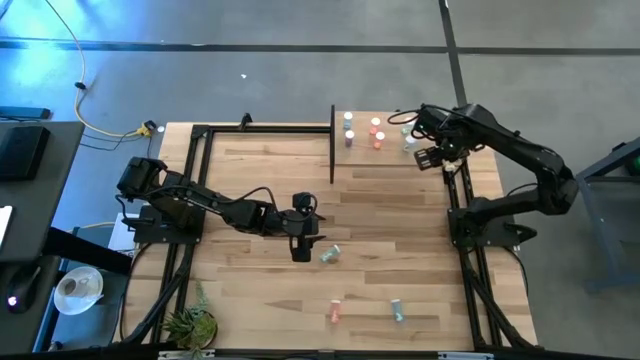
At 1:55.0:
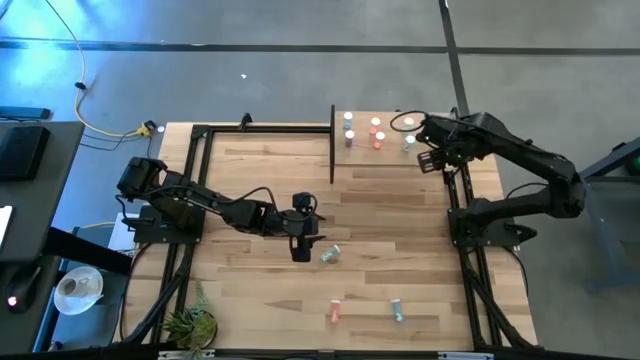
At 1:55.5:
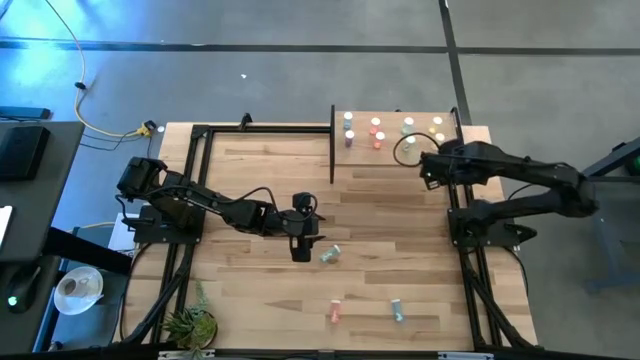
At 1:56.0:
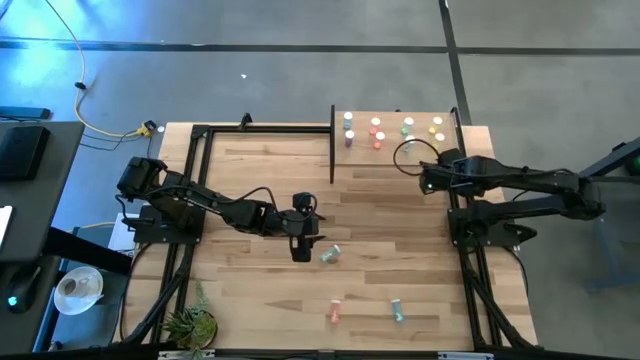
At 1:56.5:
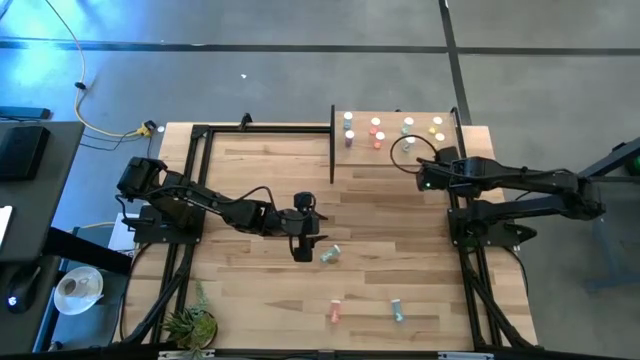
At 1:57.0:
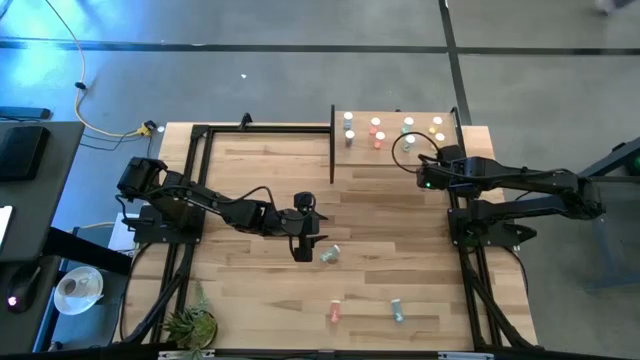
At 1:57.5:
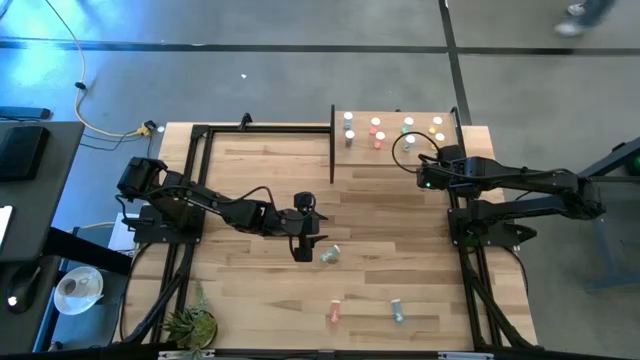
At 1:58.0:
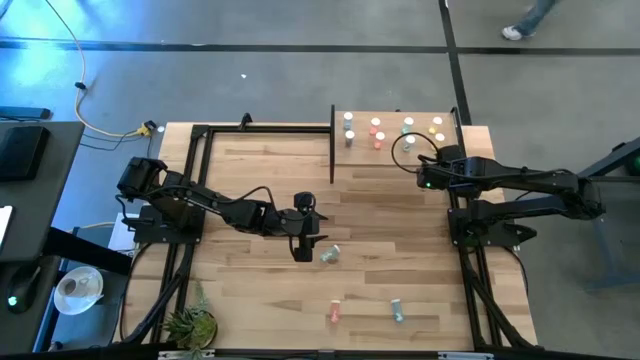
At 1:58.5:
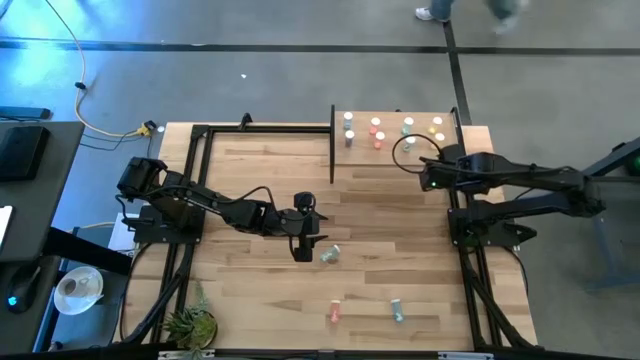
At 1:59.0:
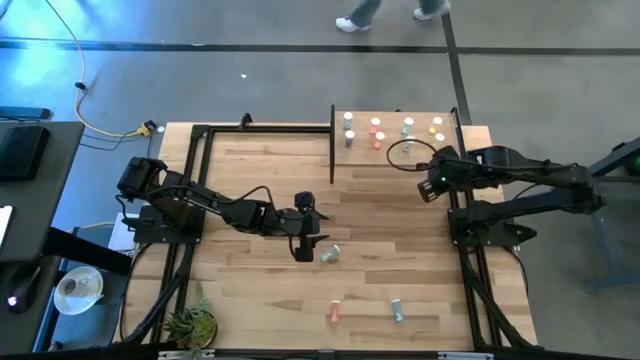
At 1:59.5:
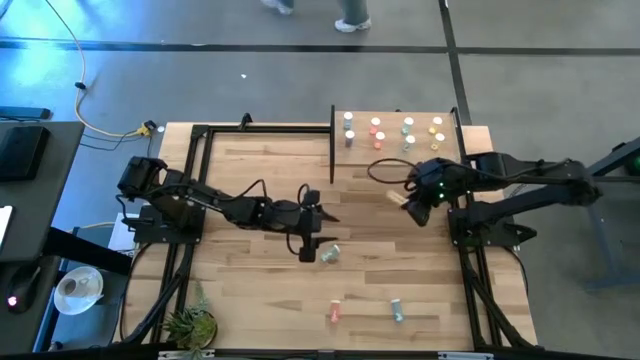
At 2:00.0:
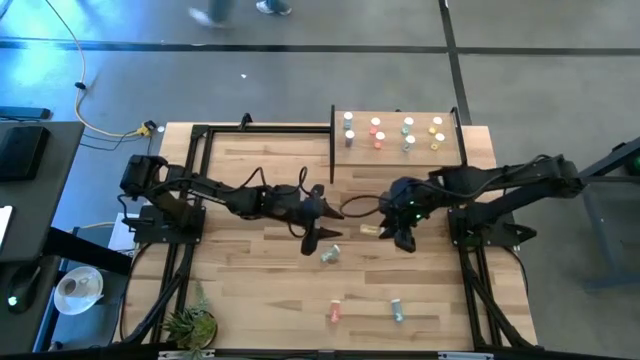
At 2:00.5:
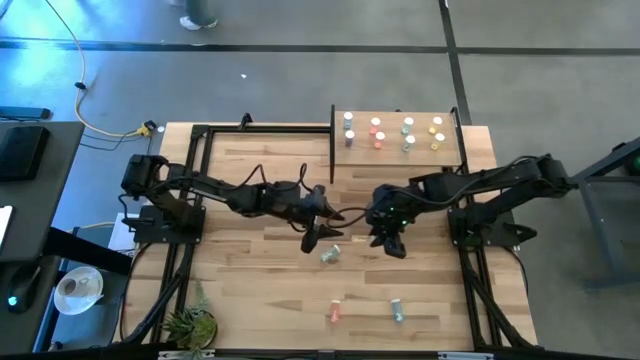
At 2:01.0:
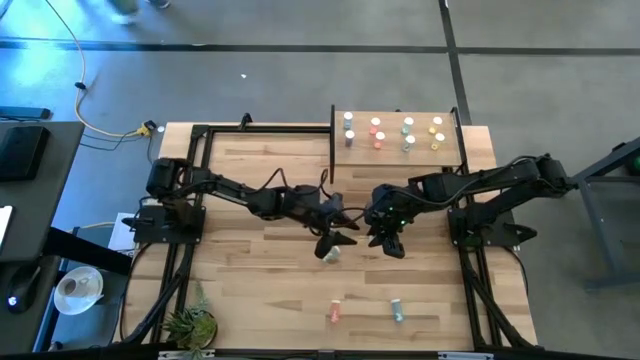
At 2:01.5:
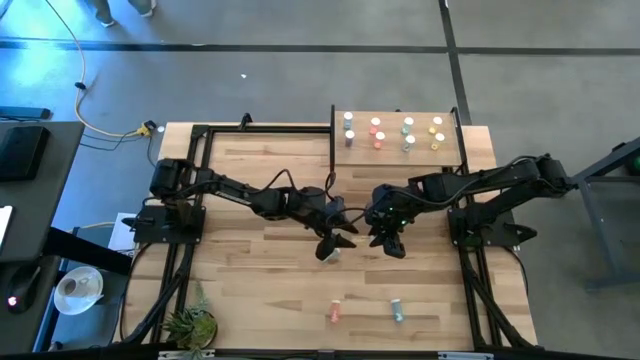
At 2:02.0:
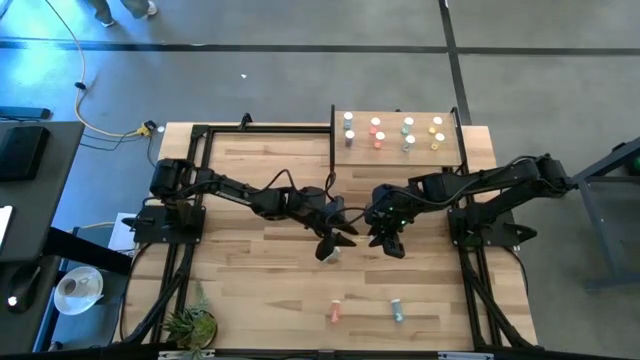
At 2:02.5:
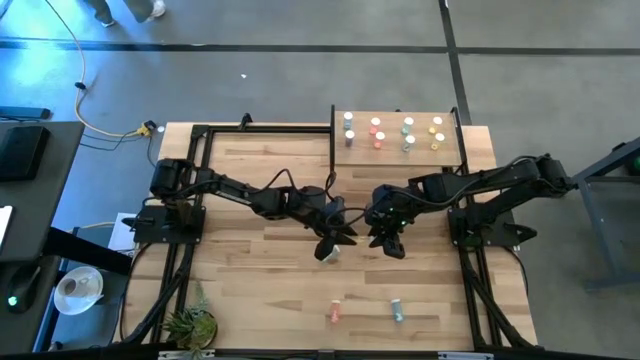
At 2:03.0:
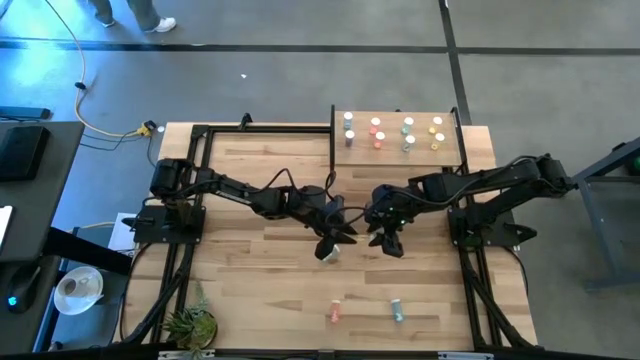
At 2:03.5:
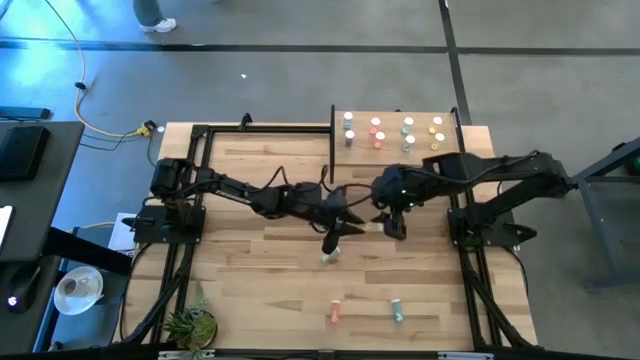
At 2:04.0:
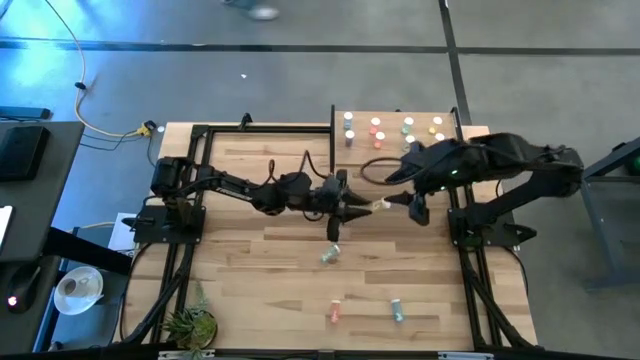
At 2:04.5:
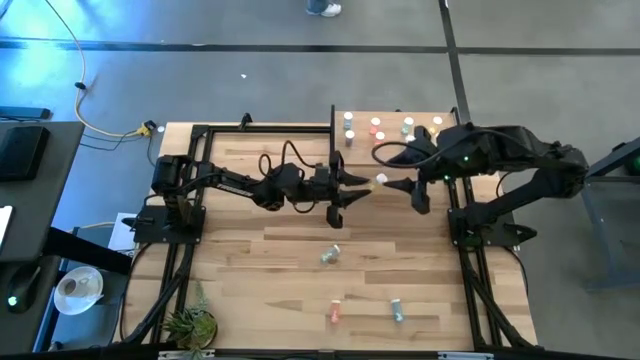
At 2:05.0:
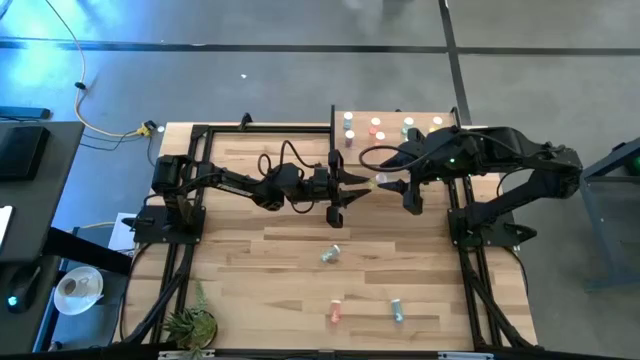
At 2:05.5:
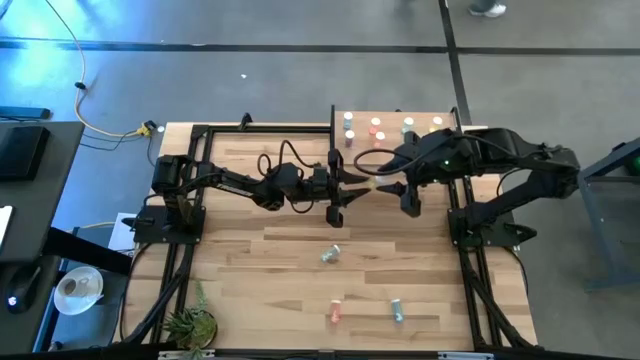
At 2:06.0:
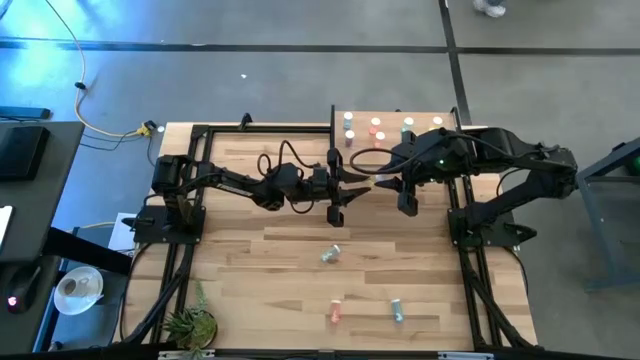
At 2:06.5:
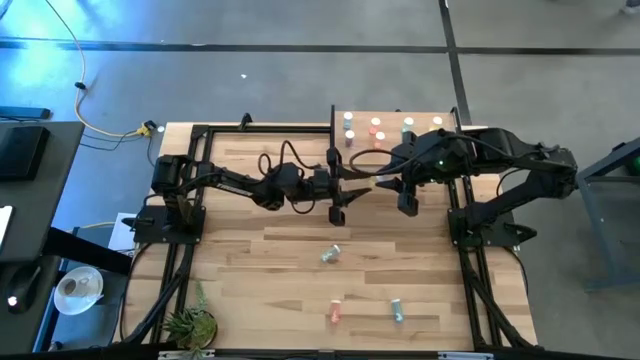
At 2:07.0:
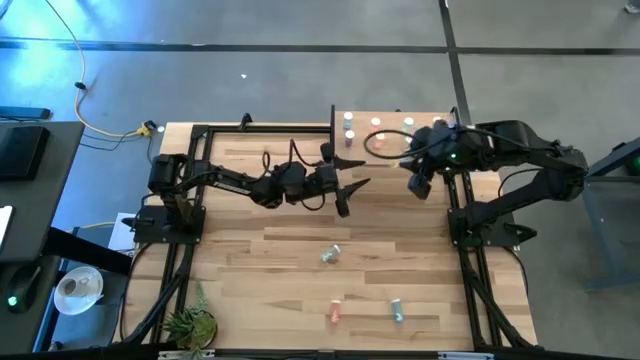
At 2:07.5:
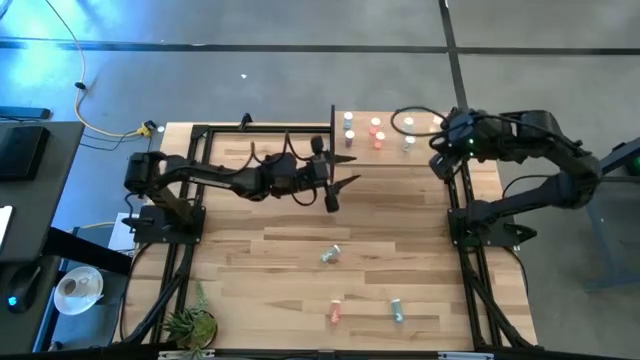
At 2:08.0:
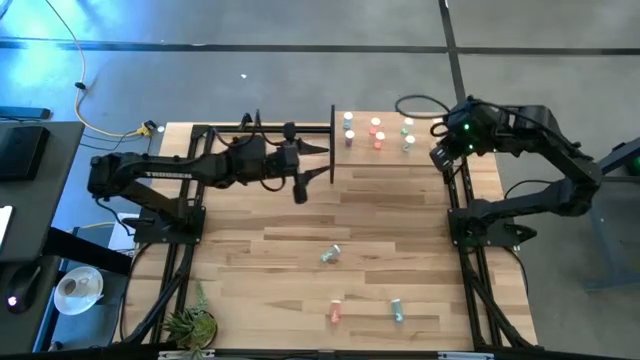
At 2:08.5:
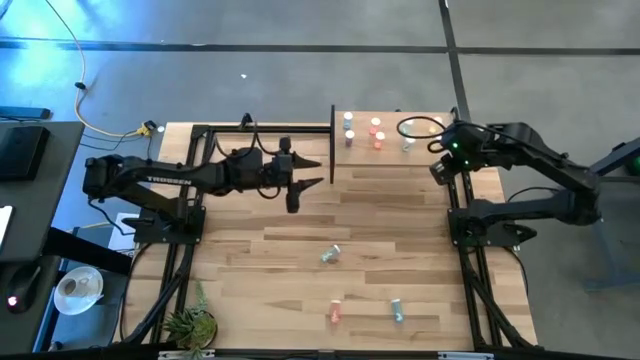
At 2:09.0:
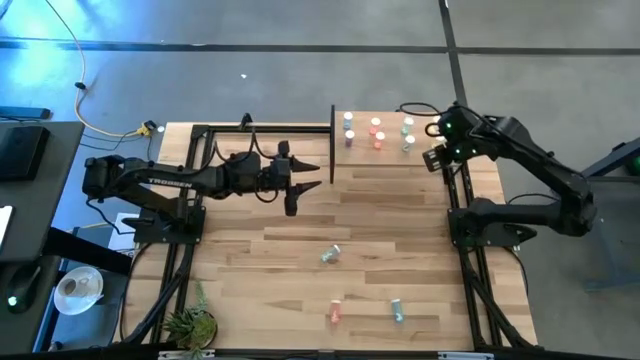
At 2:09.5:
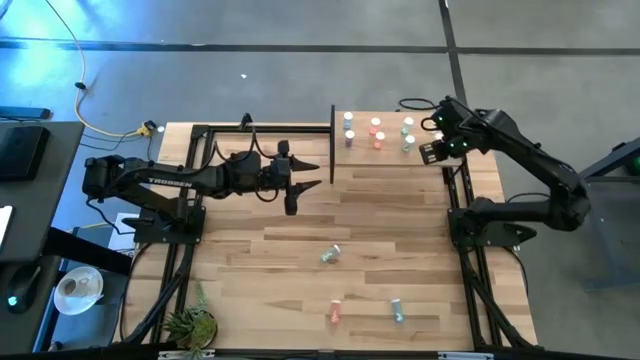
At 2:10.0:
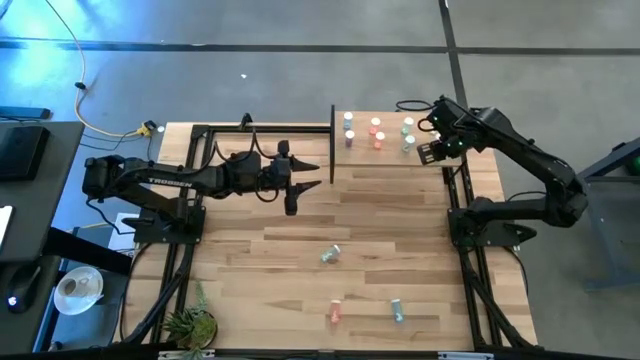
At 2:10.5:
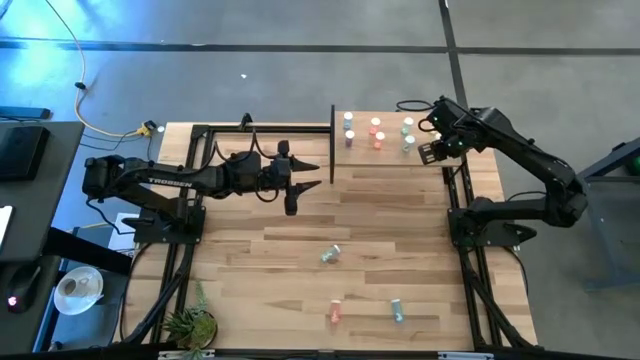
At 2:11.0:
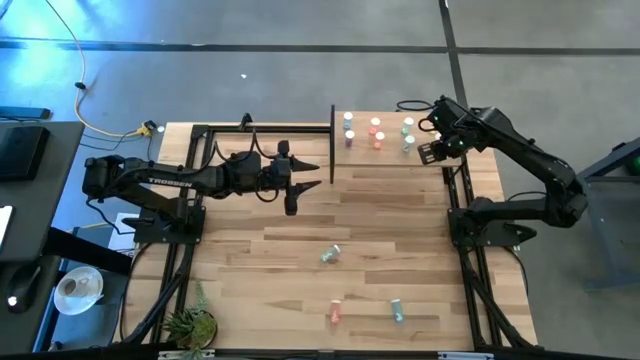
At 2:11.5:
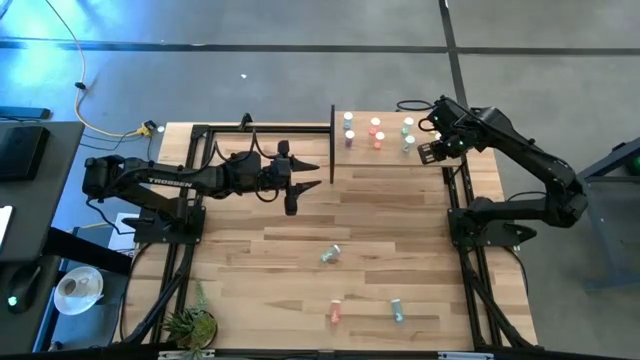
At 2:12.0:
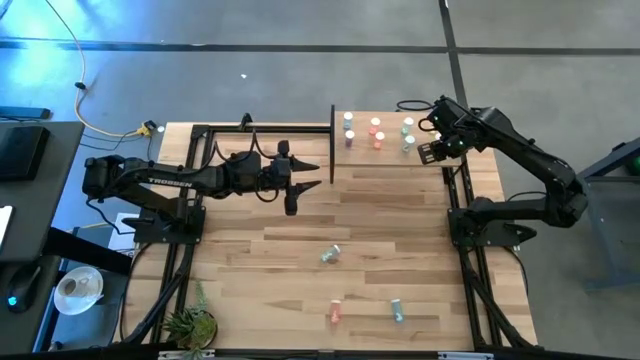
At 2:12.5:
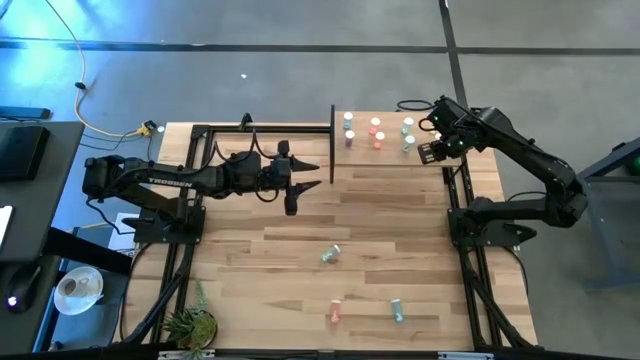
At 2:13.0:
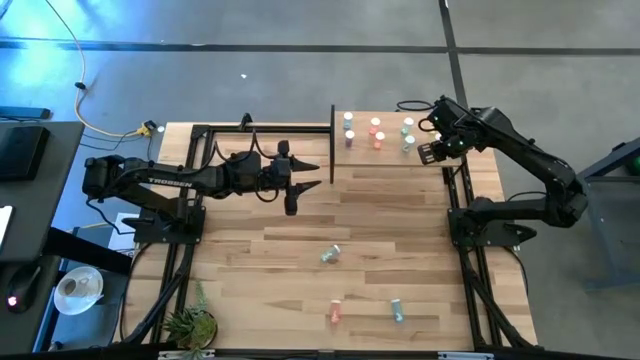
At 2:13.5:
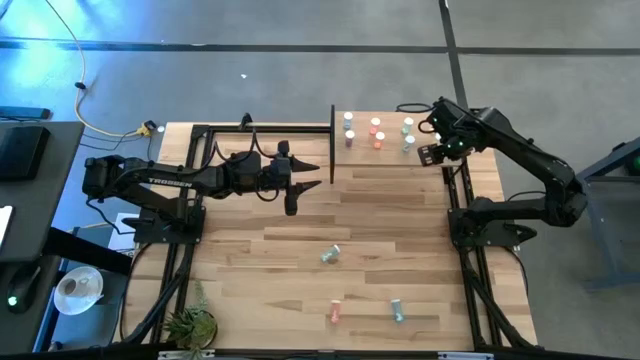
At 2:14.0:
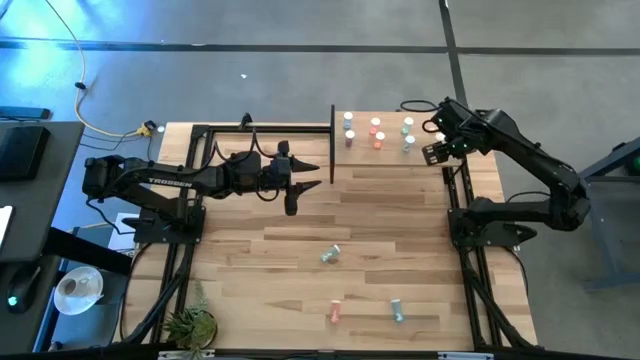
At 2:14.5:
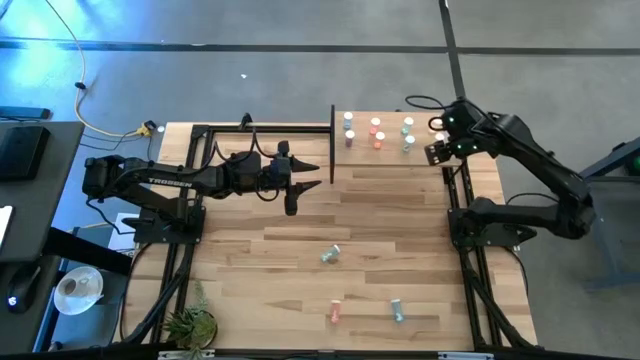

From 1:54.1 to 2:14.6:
Task: Pick and place medicine bottles onto shelf by color
Put the yellow pill bottle on the shelf aligned with the yellow pill bottle
